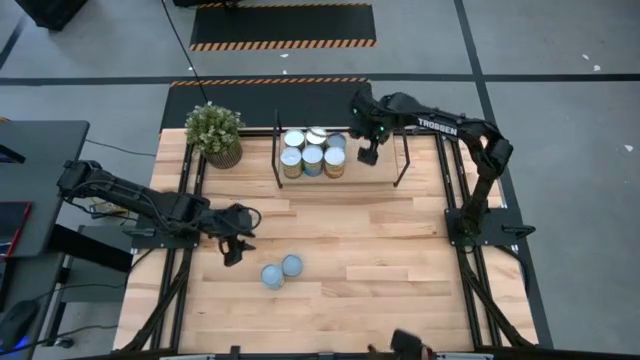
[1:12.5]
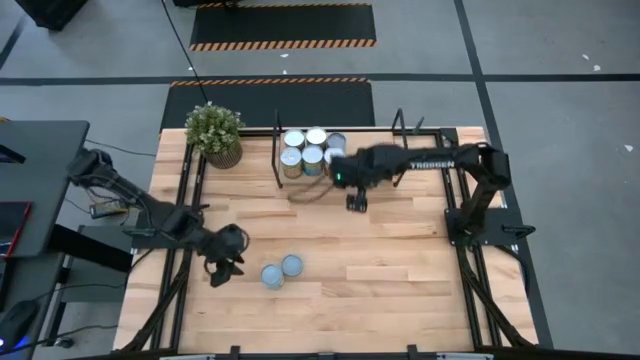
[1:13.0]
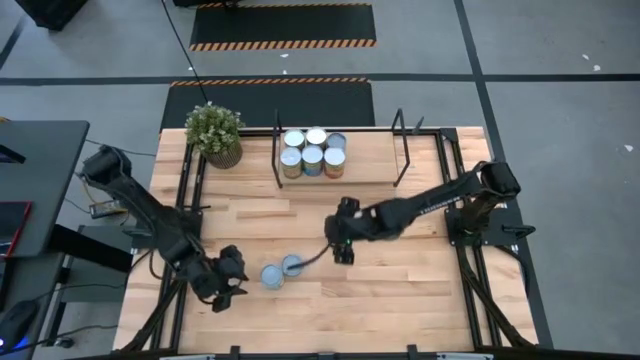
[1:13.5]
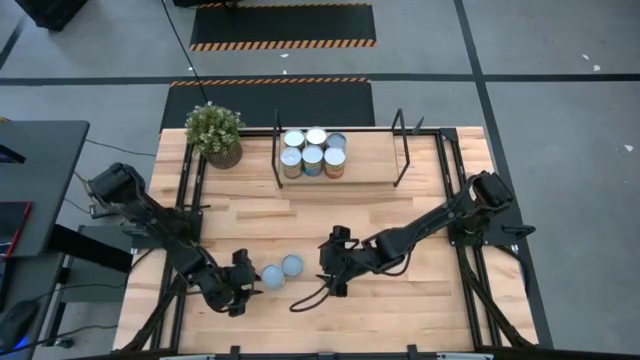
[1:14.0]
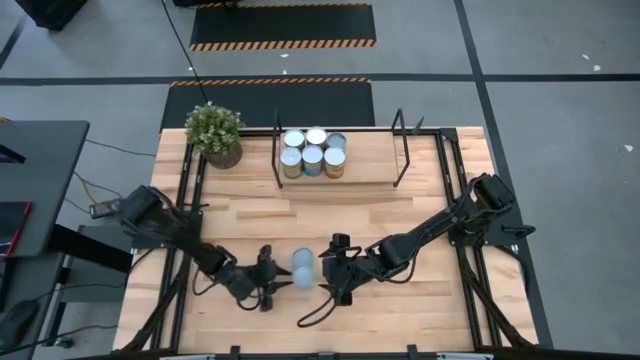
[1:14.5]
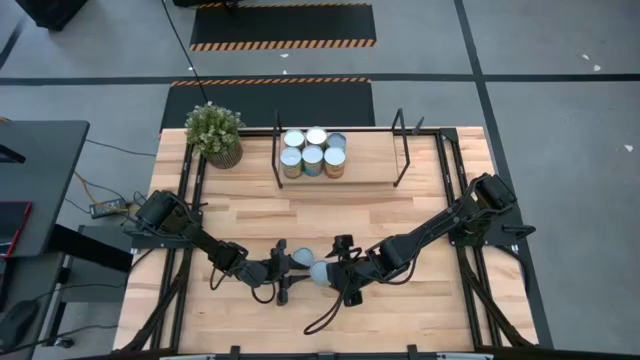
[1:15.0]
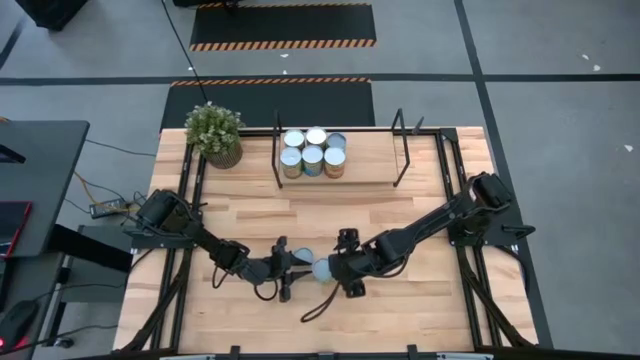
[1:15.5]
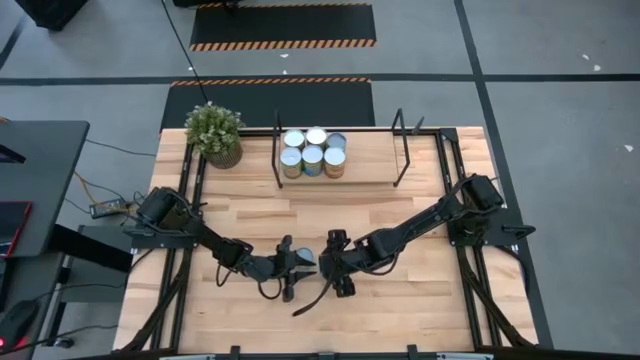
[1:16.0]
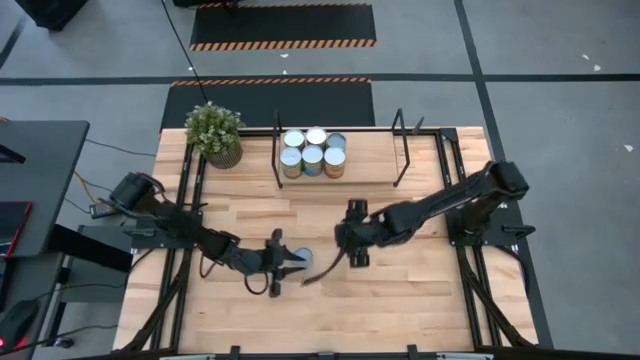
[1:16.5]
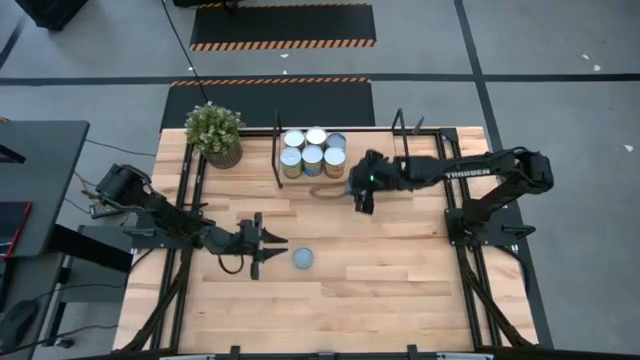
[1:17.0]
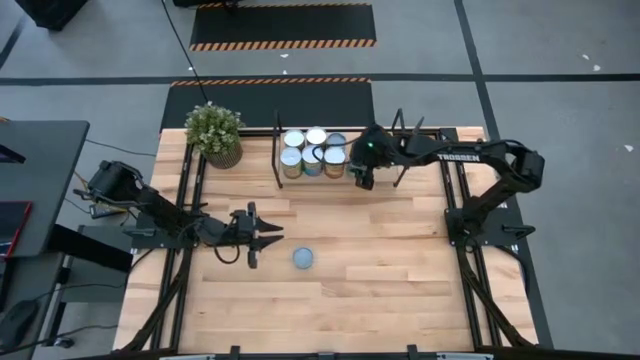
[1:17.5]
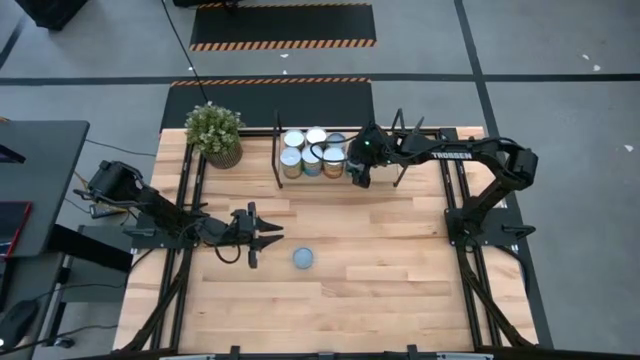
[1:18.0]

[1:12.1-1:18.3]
Task: Pick and place cans onto a shelf
Put the canned chicken soup on the shelf

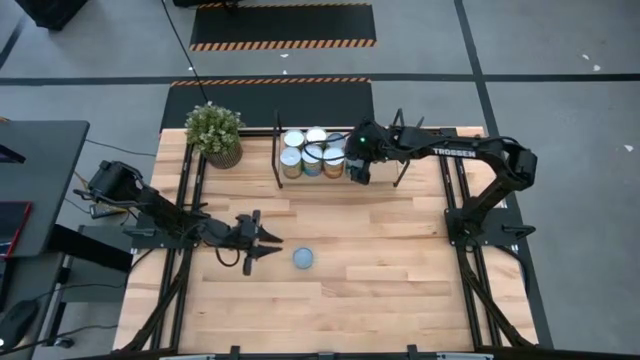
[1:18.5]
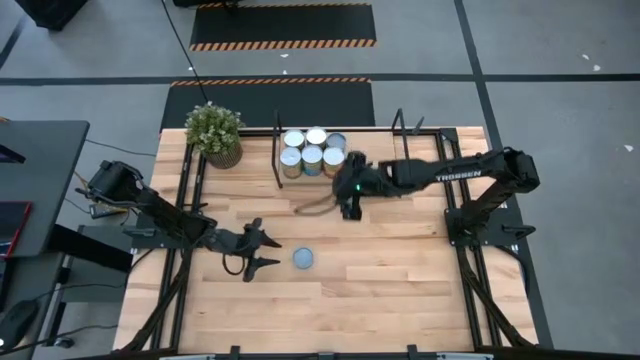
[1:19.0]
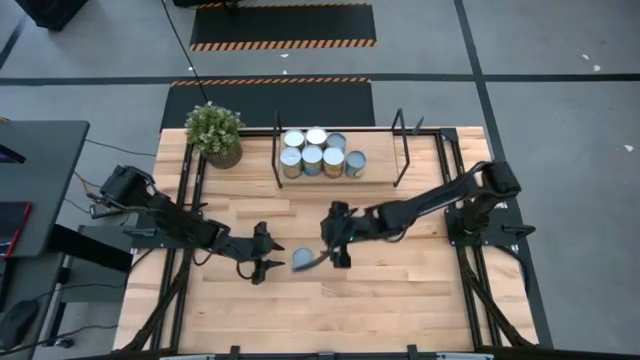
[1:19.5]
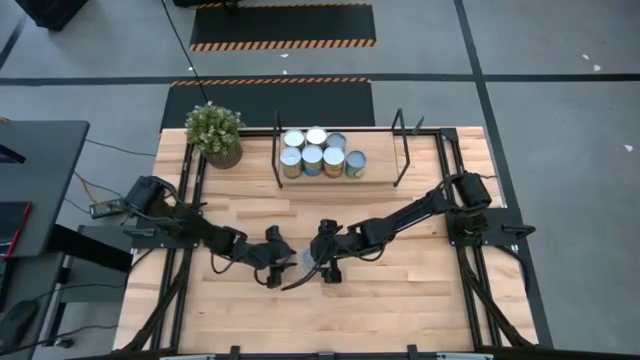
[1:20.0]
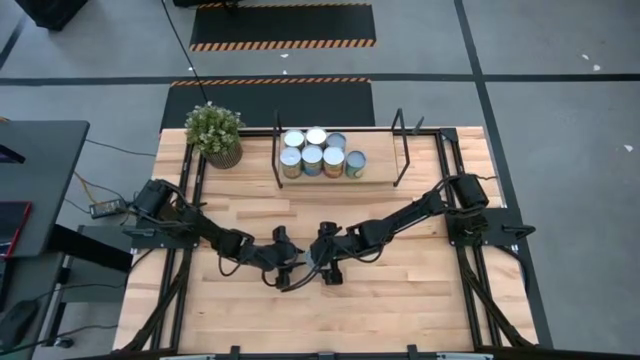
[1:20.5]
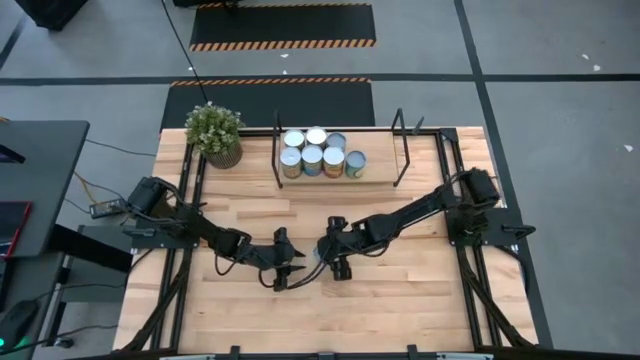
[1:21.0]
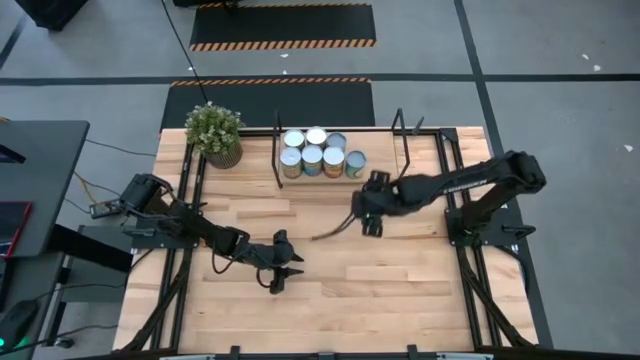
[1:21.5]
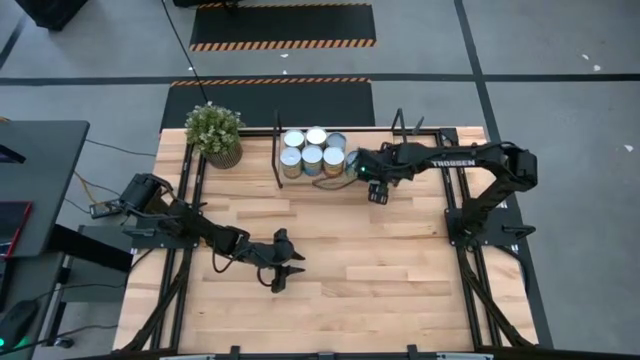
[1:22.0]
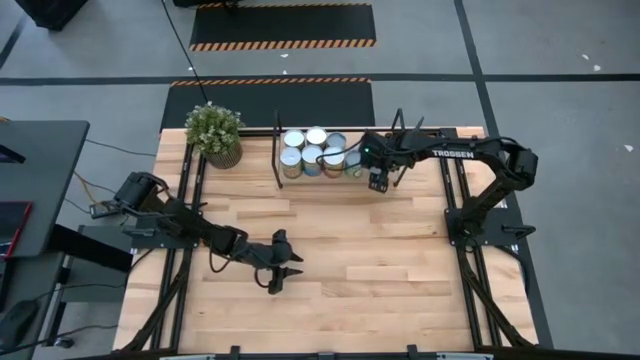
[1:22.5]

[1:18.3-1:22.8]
Put the canned tuna on the shelf

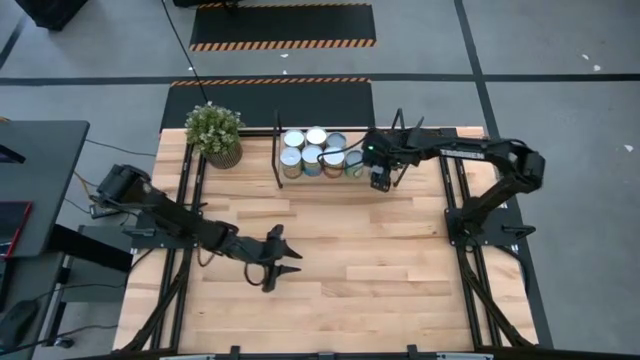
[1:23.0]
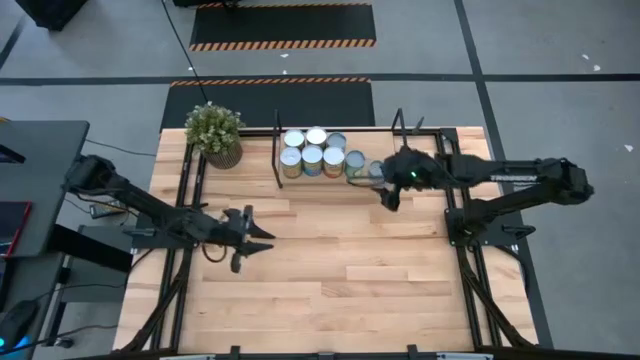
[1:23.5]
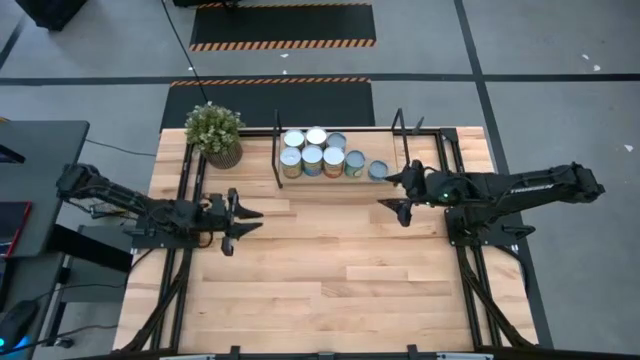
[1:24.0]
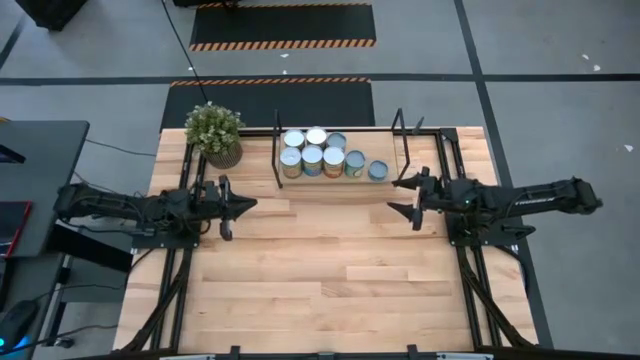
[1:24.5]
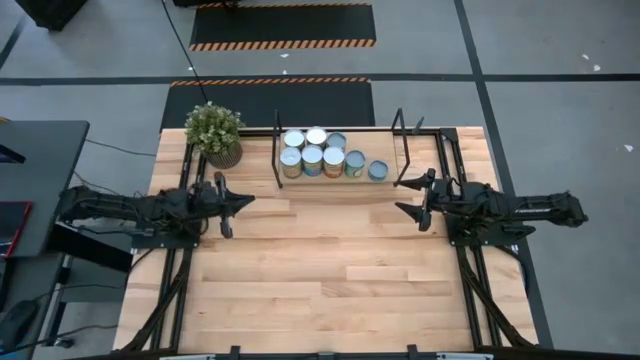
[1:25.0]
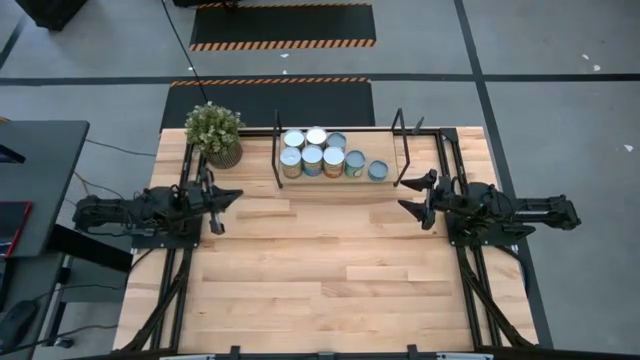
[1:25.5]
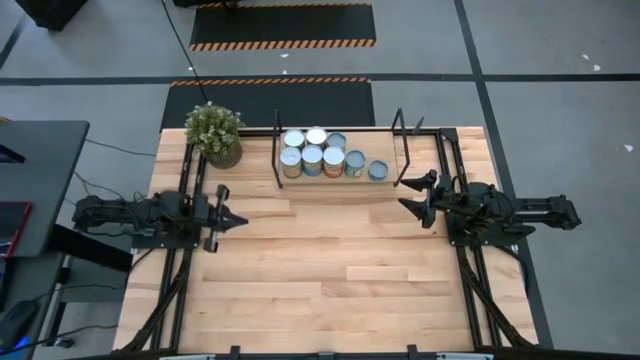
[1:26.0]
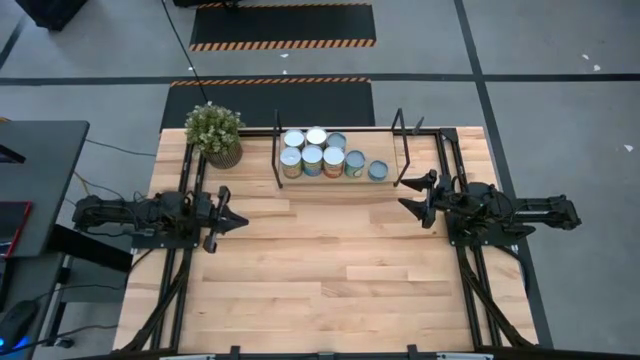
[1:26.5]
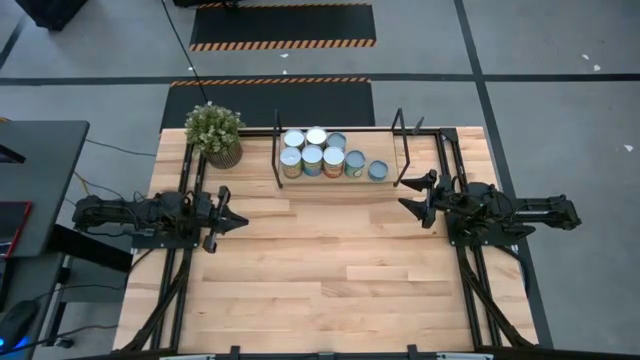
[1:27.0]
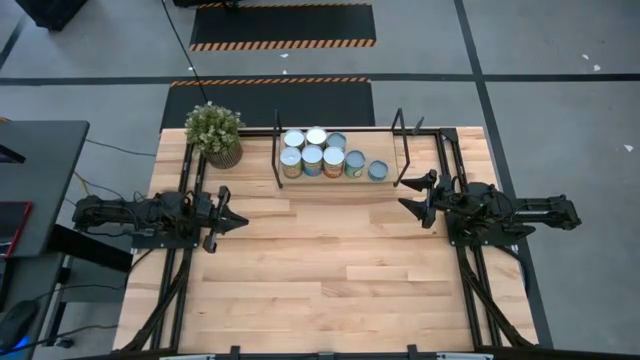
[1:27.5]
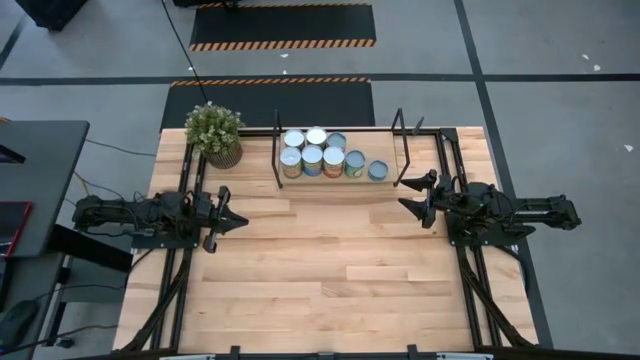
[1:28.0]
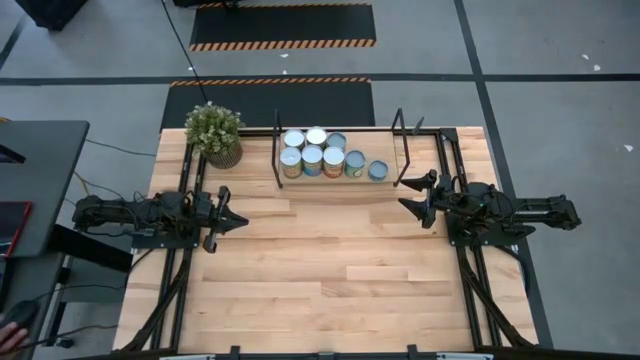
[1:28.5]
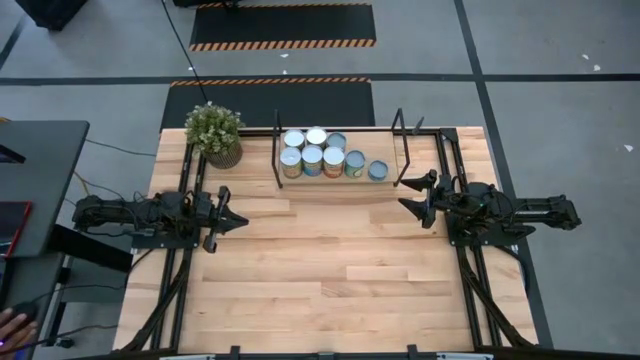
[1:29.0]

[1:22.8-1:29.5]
Return to Home Position

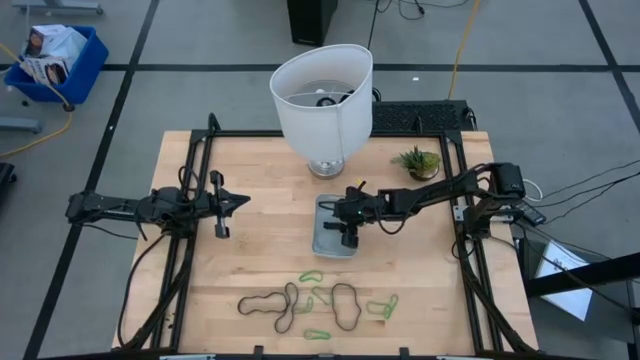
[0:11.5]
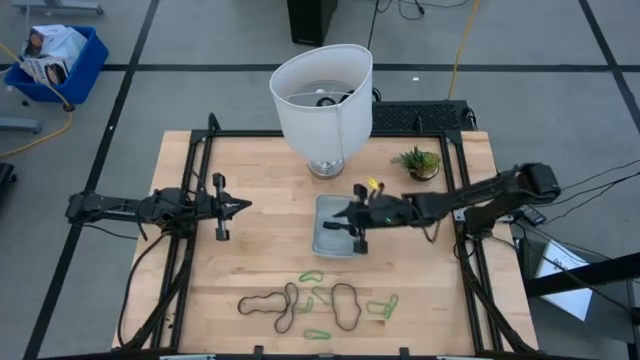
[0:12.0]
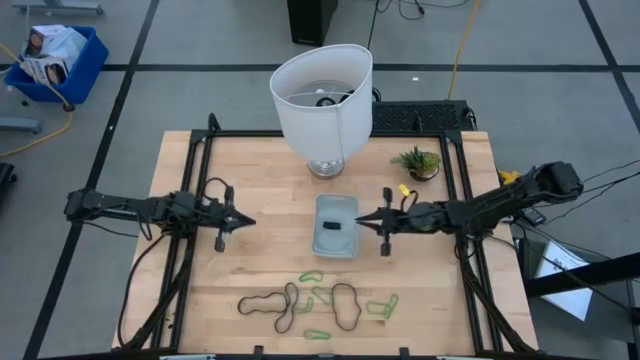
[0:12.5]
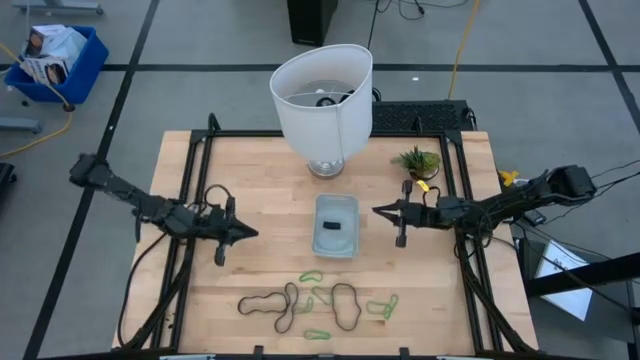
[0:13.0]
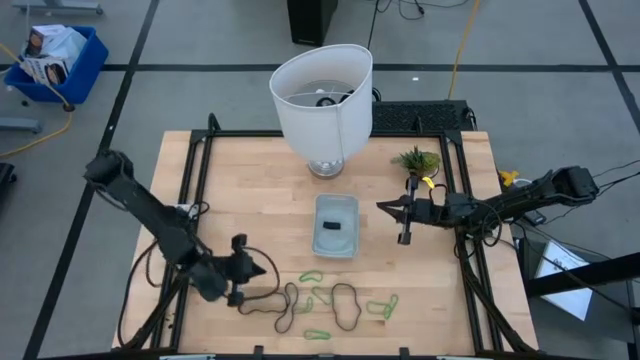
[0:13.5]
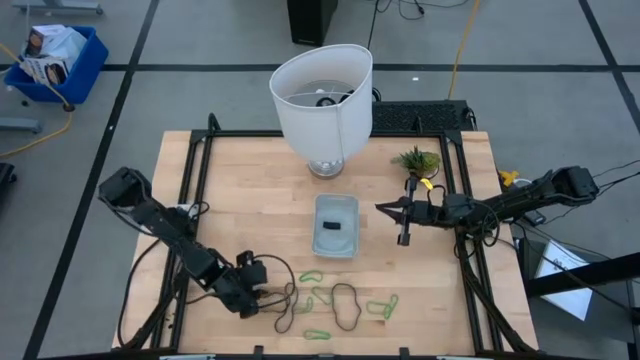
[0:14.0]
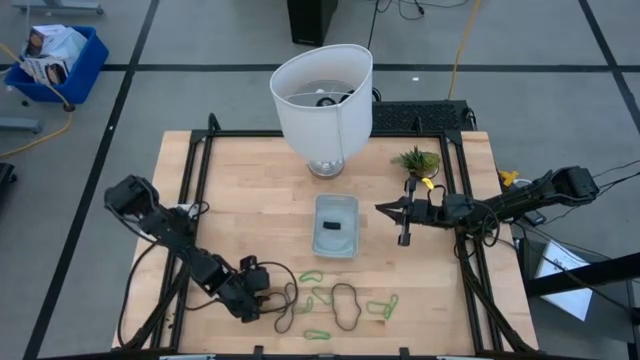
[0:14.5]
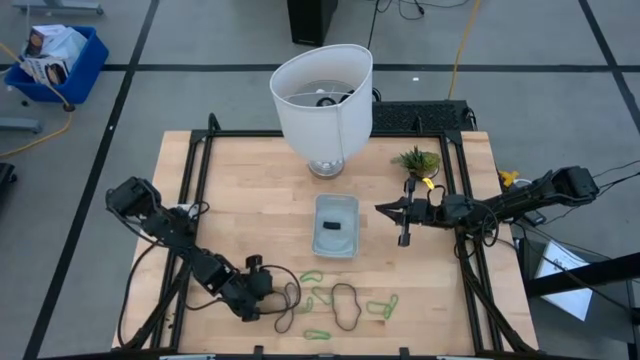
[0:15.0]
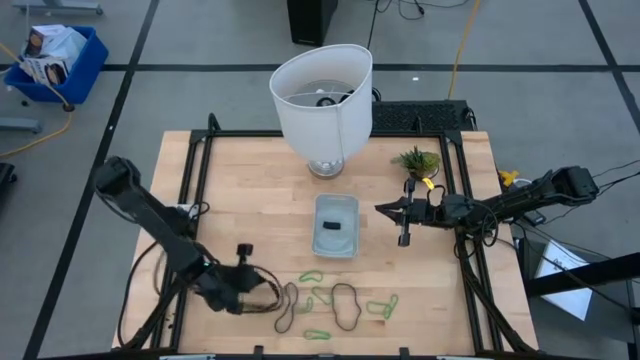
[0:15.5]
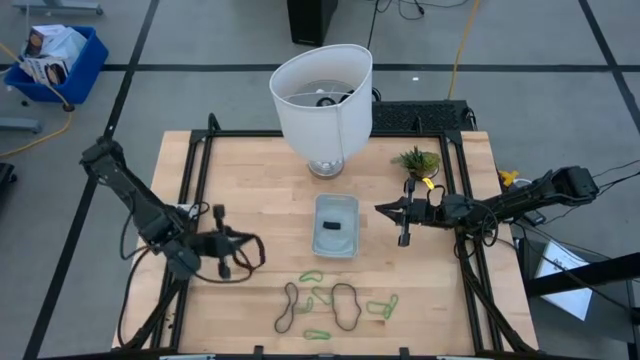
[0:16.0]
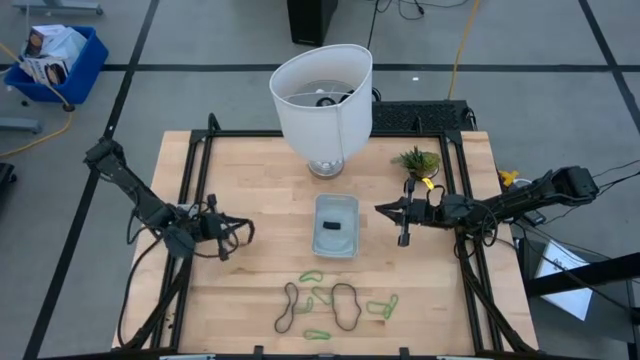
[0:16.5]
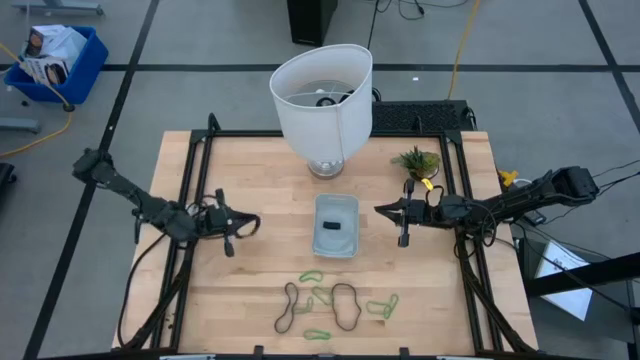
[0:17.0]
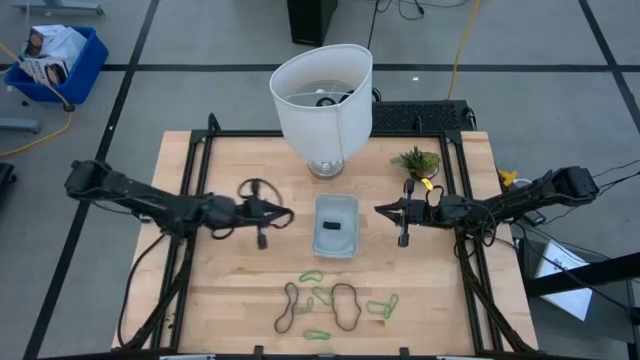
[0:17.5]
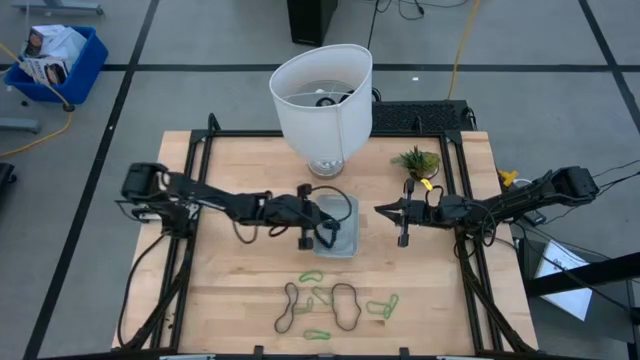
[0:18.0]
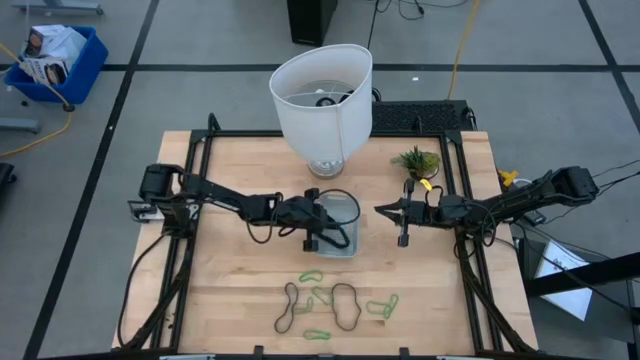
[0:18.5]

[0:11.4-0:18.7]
Task: Pick and place rubber bands into bin
Put the black rubber band into the gray bin
